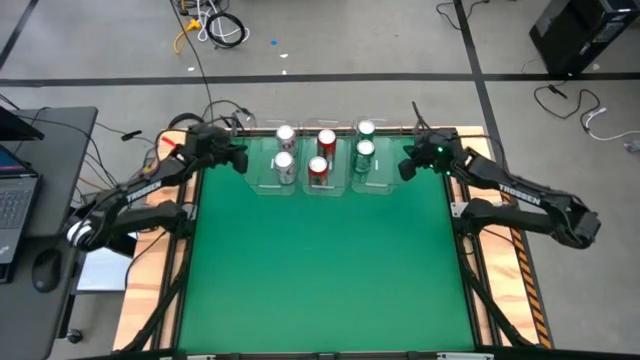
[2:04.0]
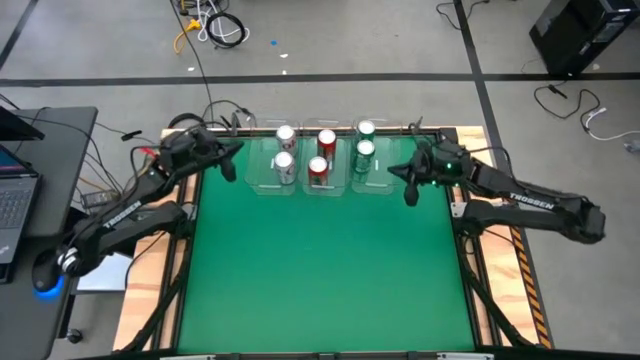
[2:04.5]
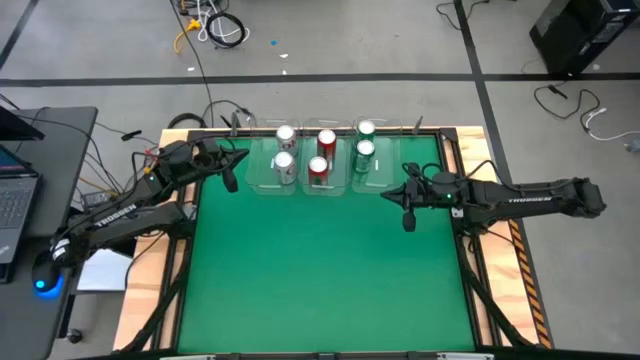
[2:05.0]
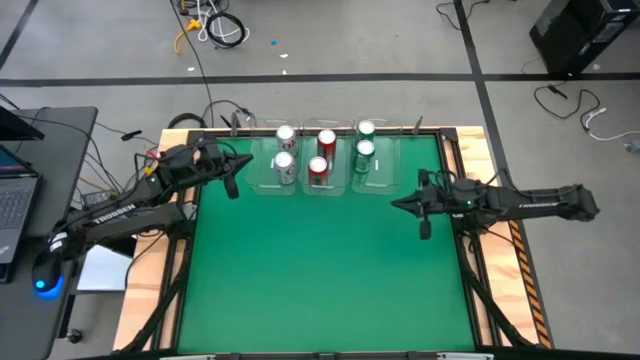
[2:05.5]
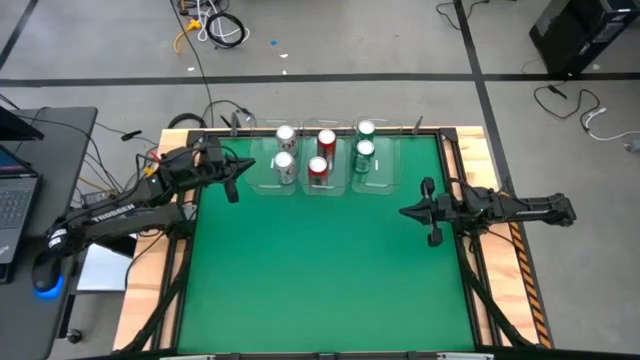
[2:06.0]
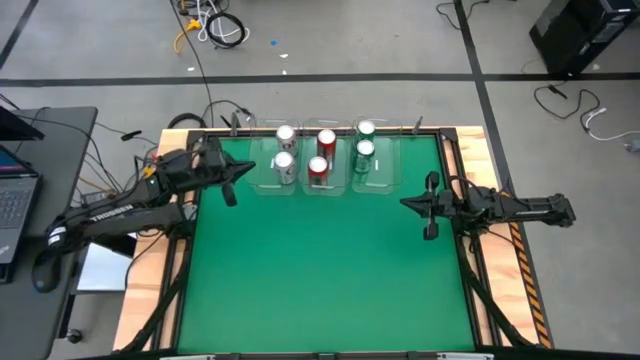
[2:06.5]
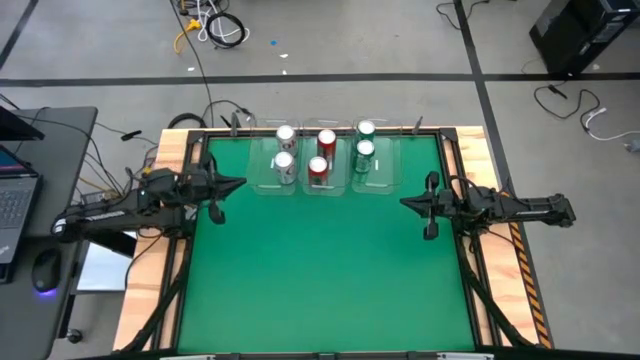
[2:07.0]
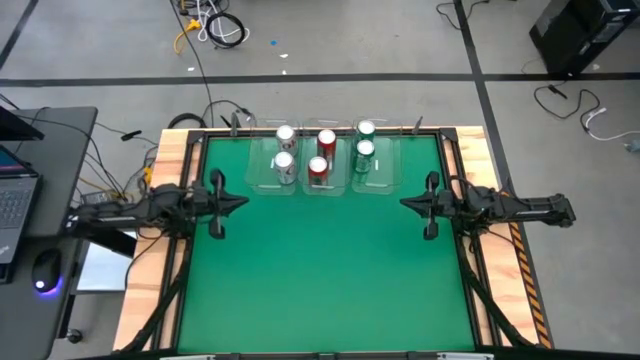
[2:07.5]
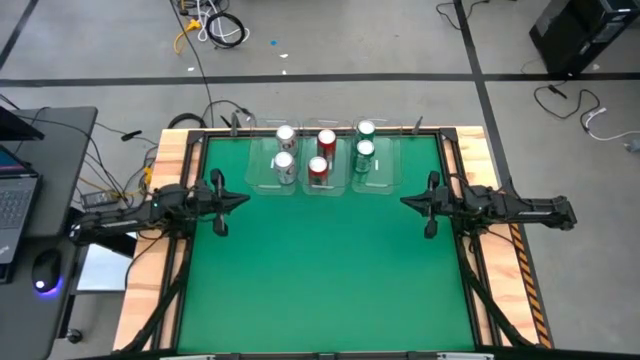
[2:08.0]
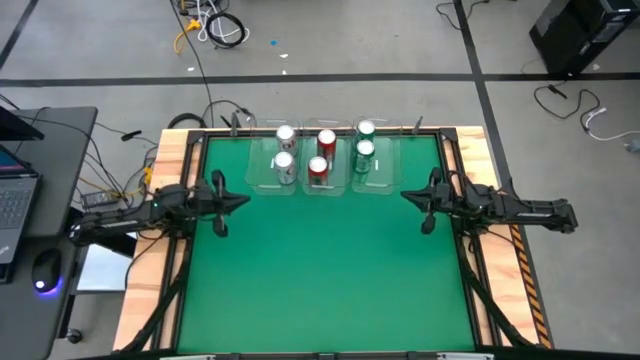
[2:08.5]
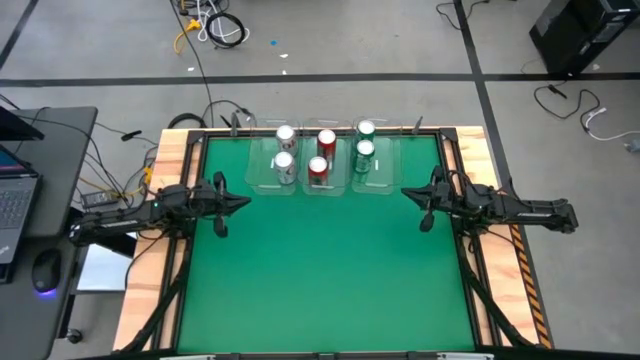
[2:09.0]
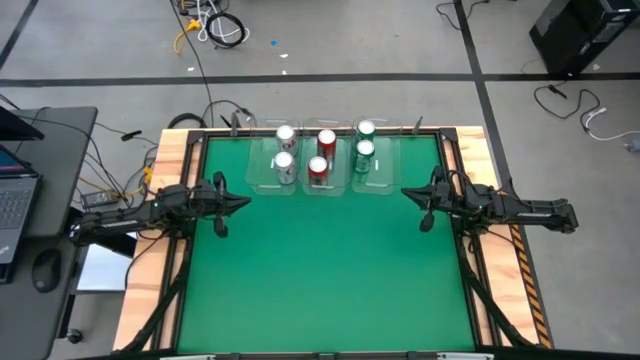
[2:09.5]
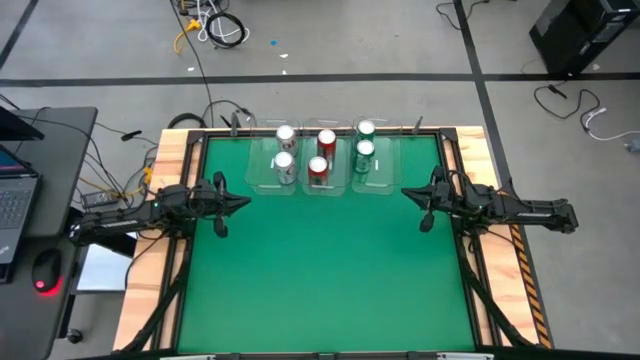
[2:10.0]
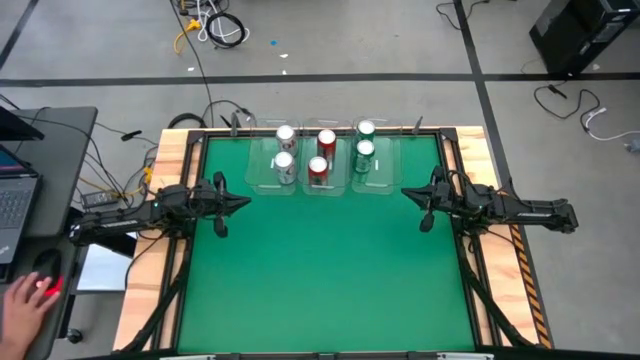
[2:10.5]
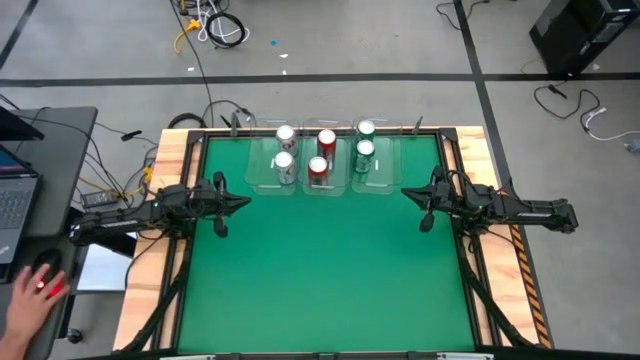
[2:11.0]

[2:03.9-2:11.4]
Task: Sort soda cans
Return to Home Position

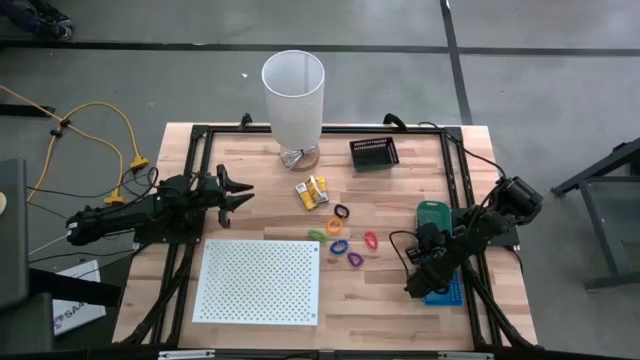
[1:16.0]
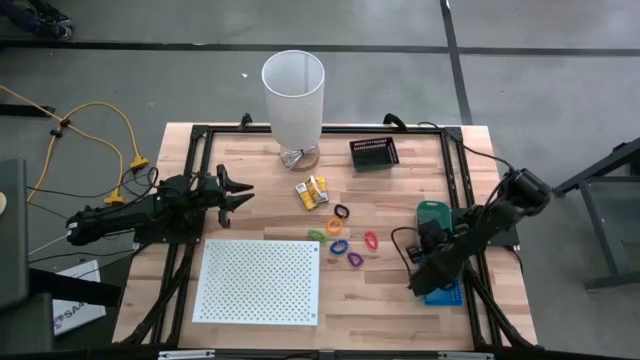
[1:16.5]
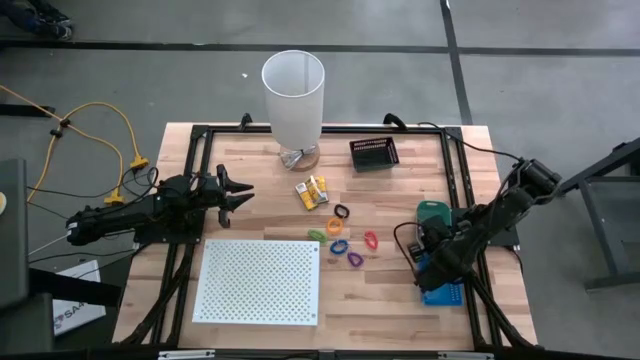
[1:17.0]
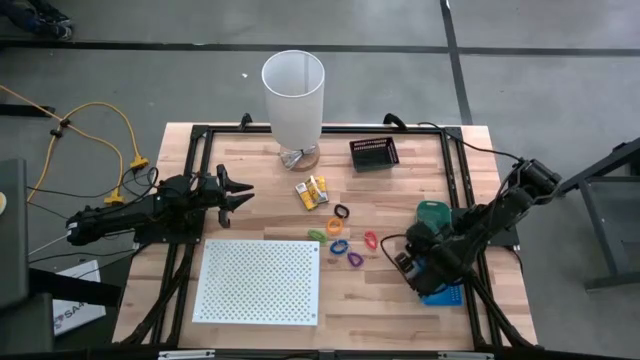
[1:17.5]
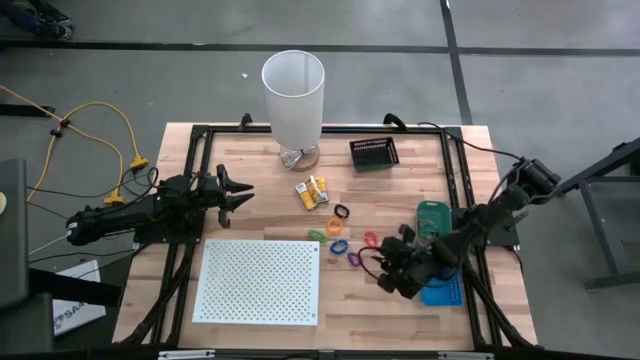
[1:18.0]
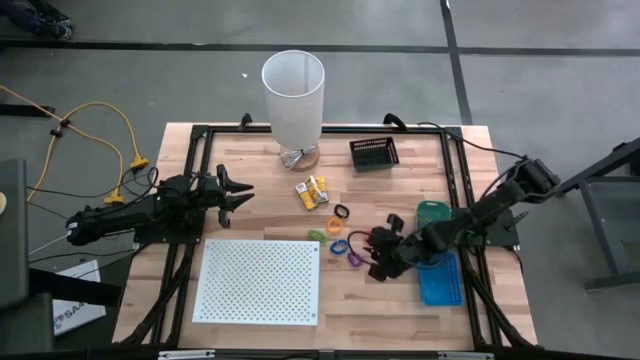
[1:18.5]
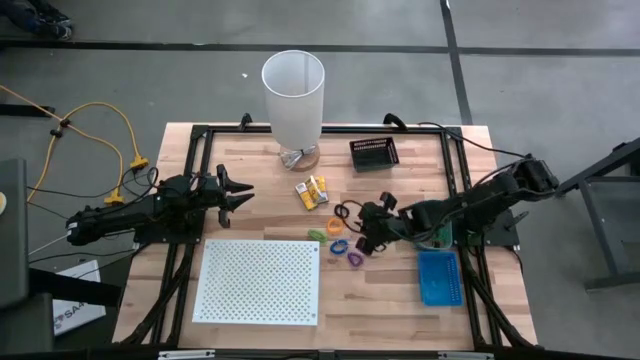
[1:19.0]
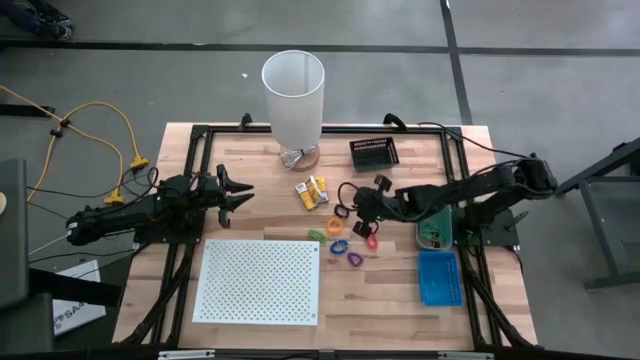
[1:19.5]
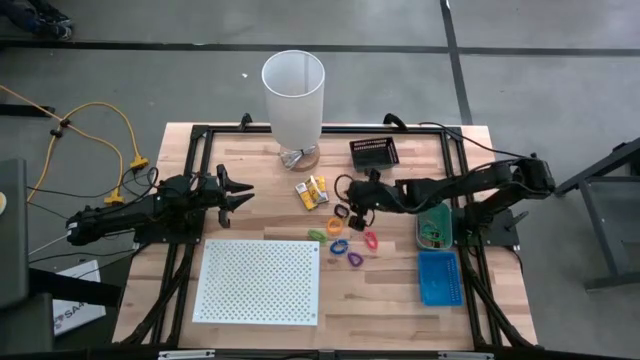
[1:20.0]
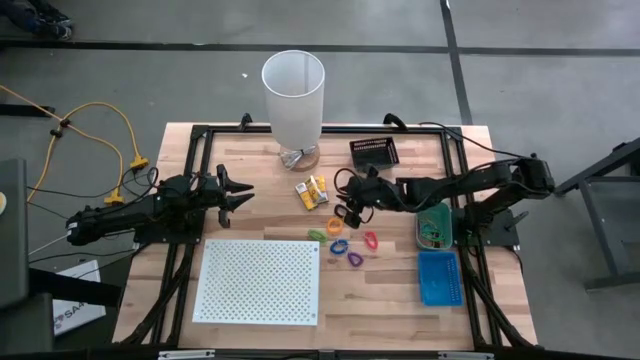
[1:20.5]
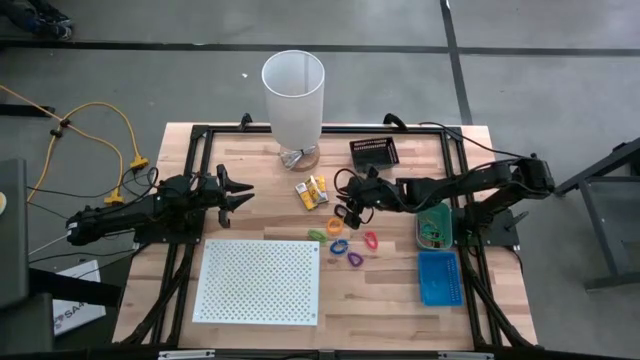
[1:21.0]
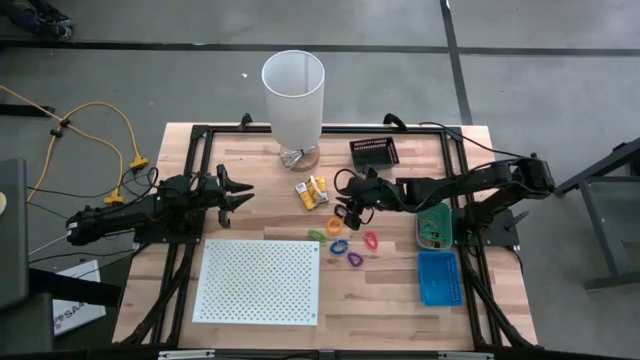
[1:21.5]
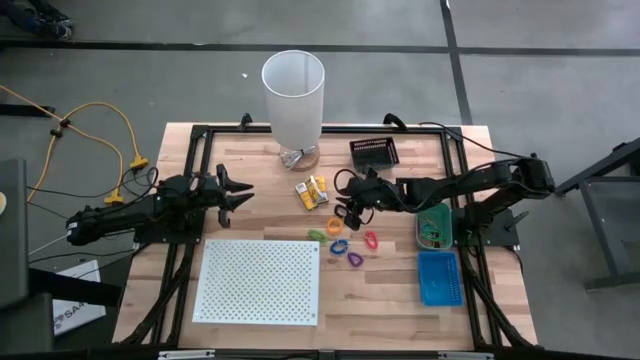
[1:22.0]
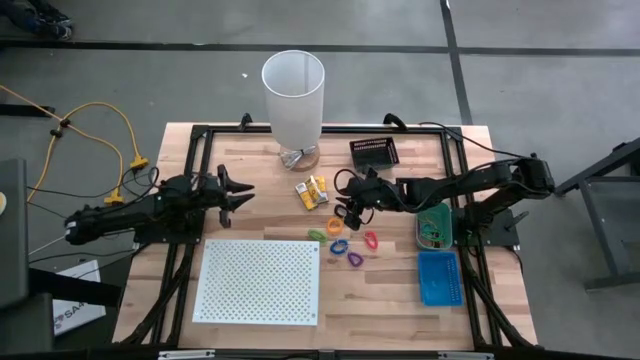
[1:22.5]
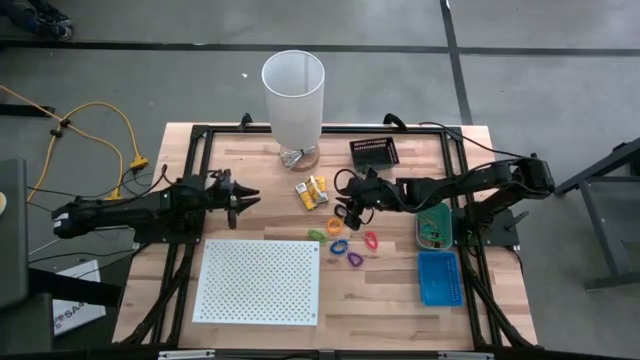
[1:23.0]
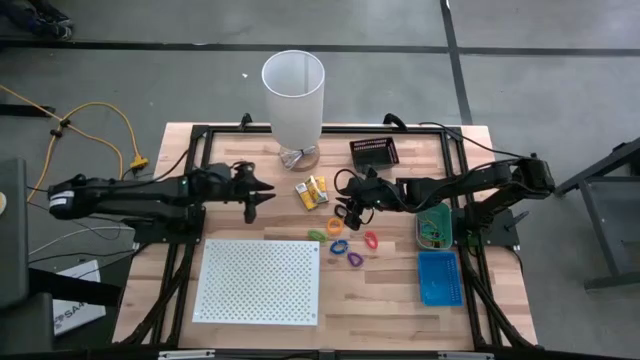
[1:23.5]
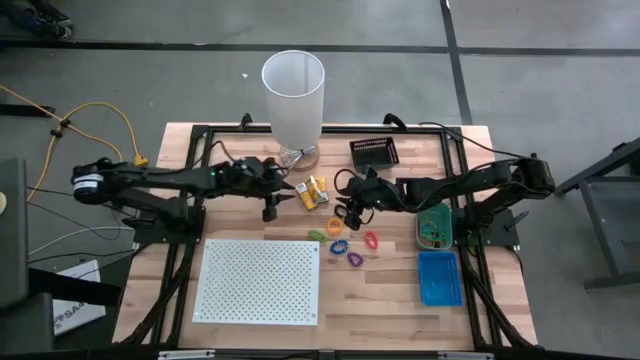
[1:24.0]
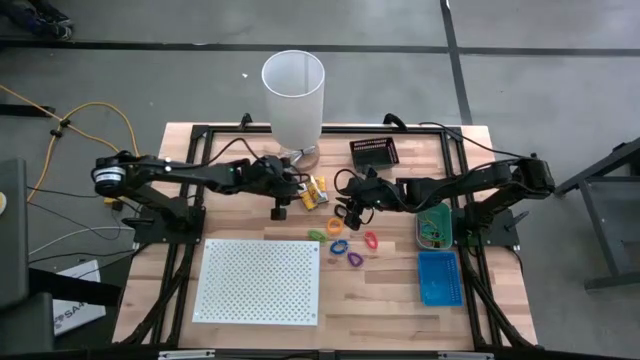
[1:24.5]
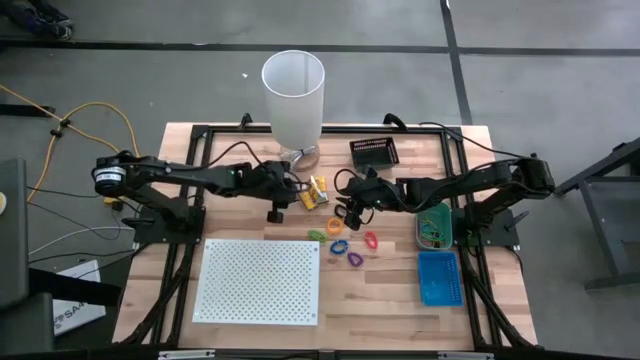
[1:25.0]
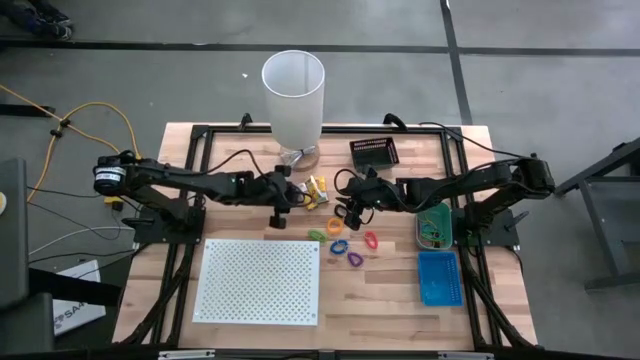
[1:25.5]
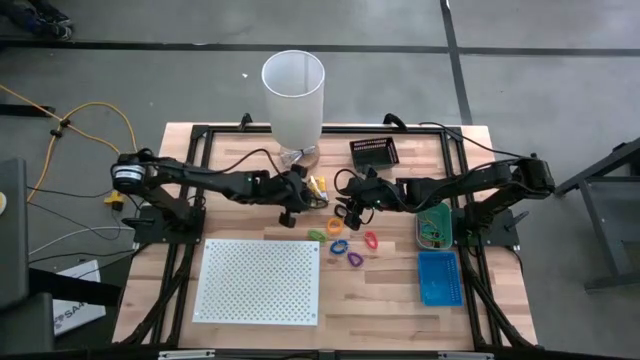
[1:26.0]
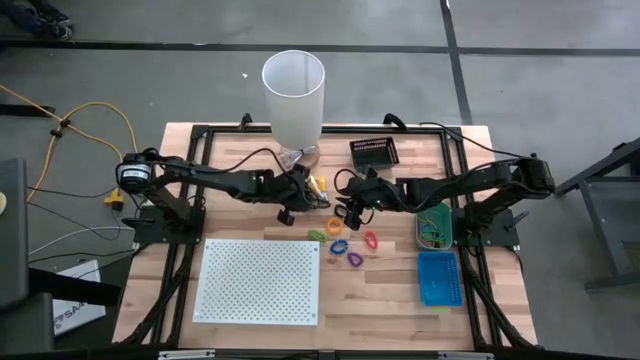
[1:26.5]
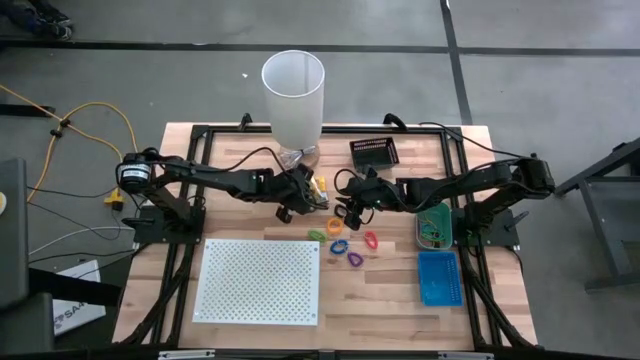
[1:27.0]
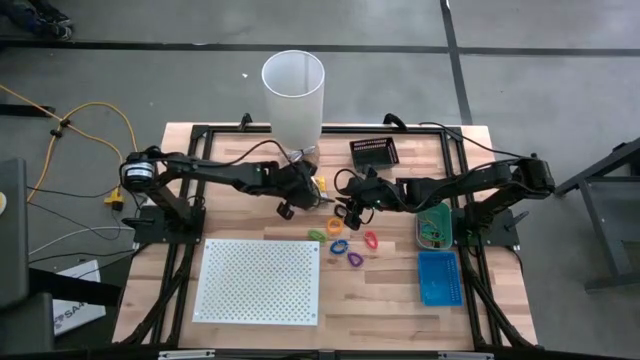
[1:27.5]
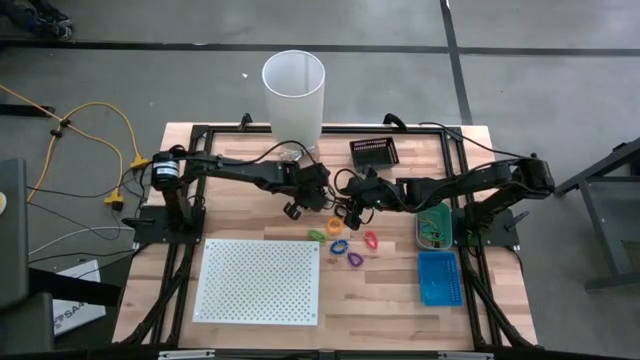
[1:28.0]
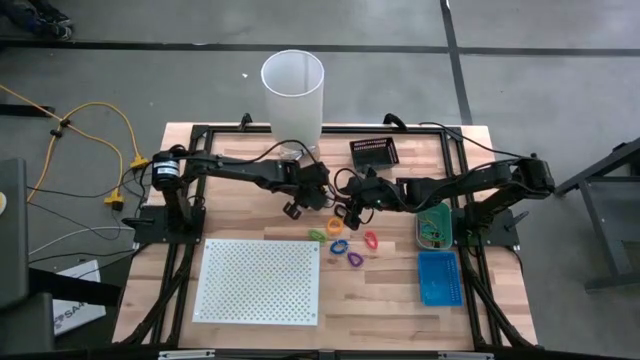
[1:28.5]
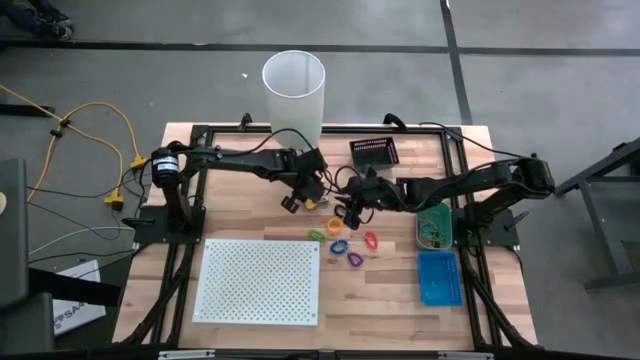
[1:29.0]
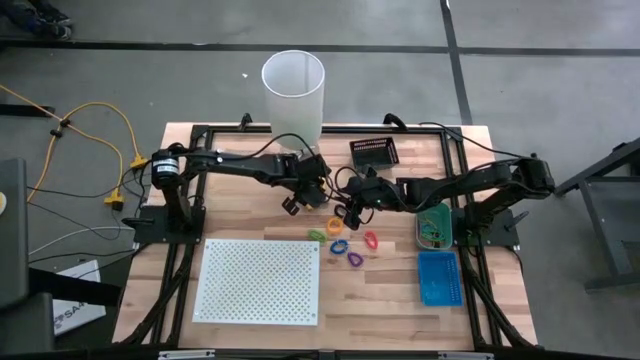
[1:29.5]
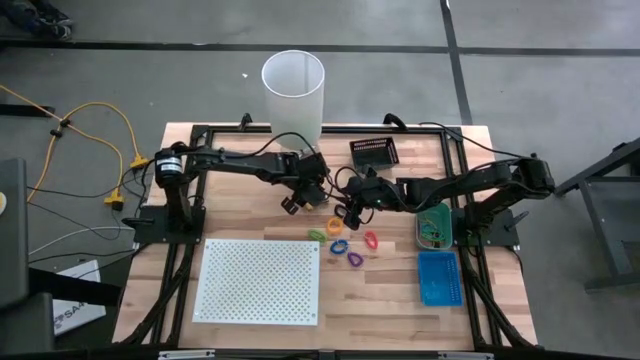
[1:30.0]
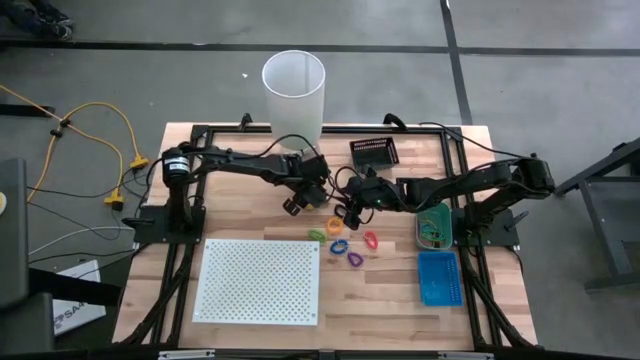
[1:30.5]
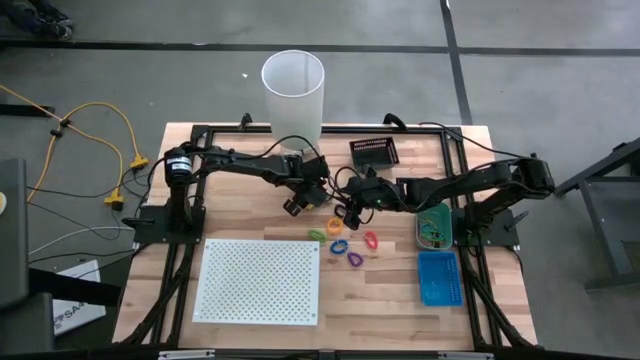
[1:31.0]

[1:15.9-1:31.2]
Task: Pick & Place Office Desk Supplies
Put the middle yellow crayon box into the black bin
